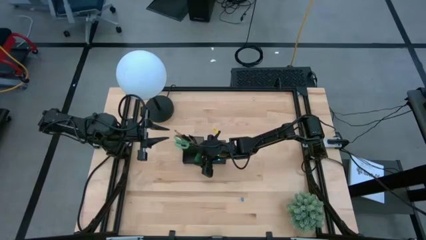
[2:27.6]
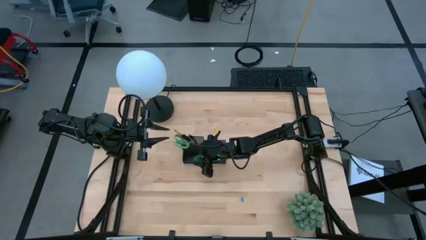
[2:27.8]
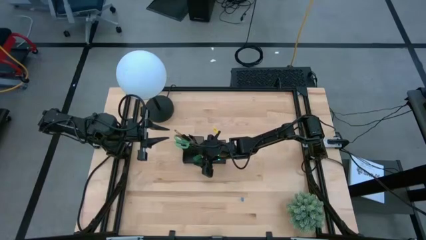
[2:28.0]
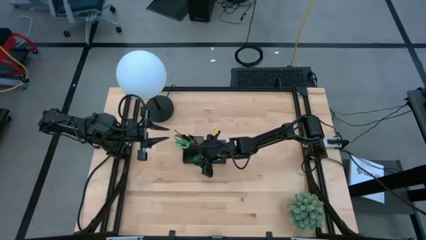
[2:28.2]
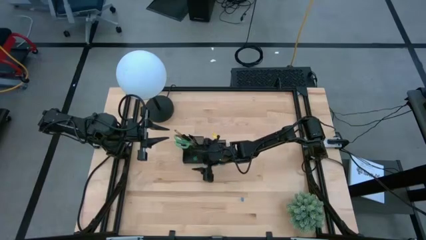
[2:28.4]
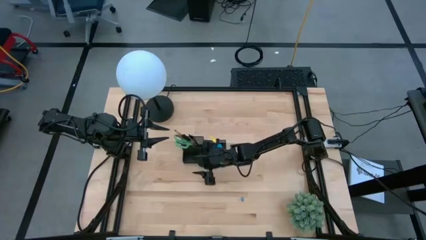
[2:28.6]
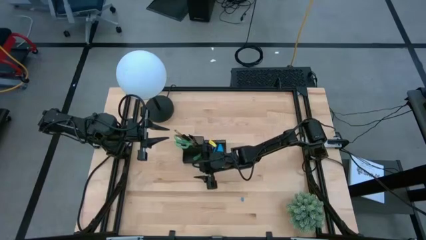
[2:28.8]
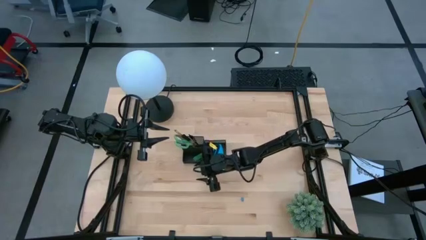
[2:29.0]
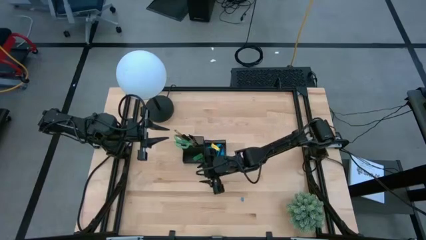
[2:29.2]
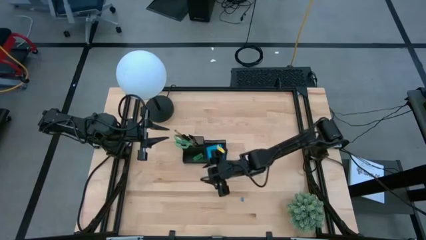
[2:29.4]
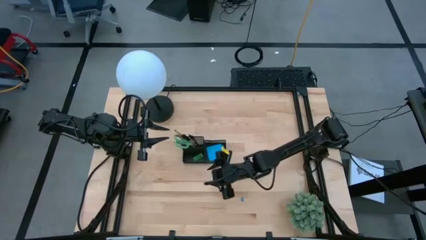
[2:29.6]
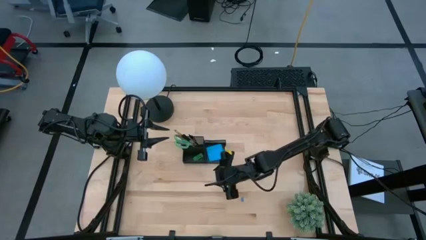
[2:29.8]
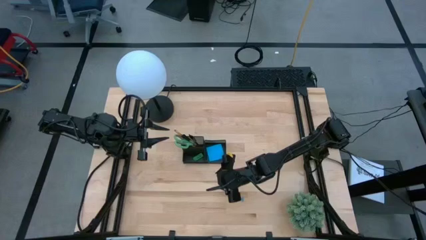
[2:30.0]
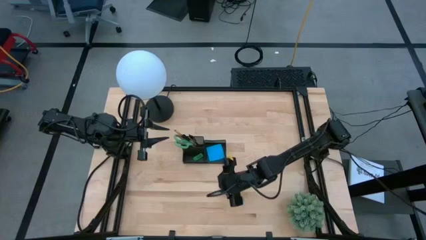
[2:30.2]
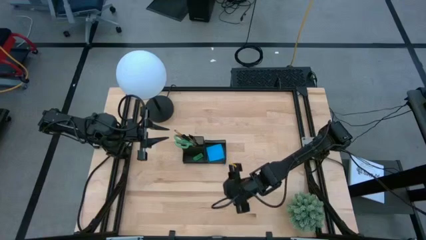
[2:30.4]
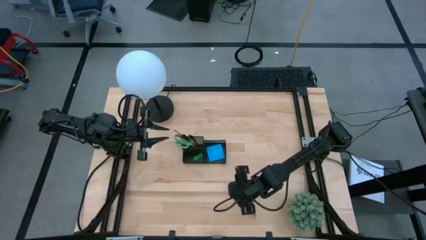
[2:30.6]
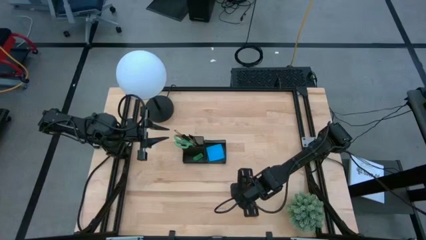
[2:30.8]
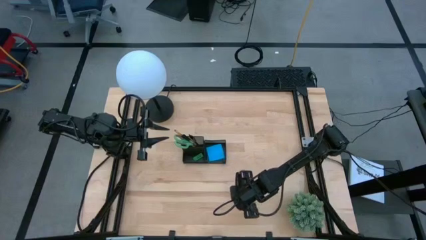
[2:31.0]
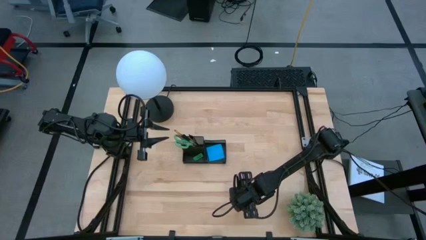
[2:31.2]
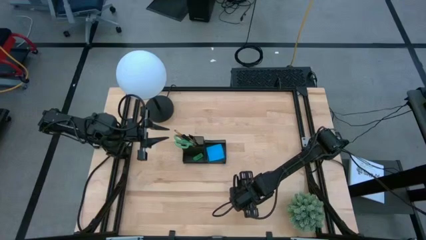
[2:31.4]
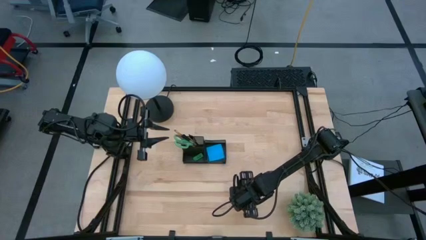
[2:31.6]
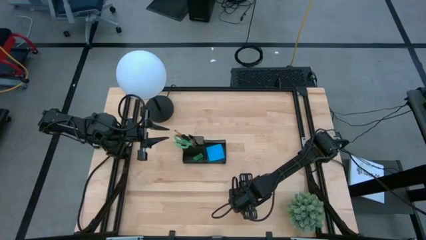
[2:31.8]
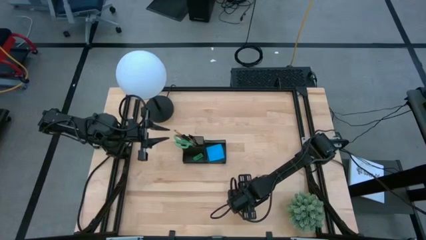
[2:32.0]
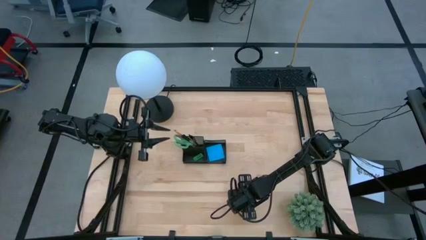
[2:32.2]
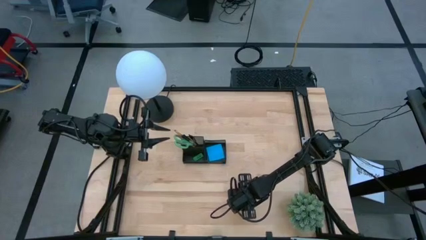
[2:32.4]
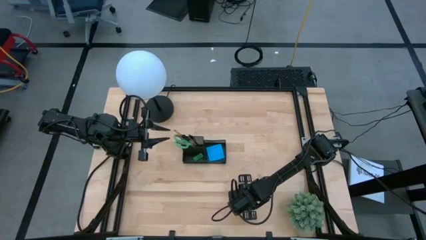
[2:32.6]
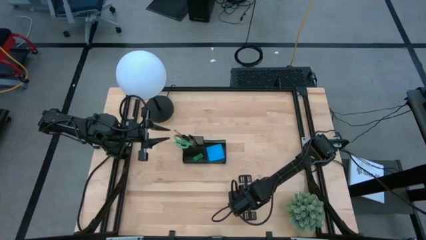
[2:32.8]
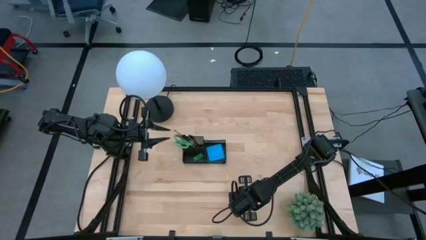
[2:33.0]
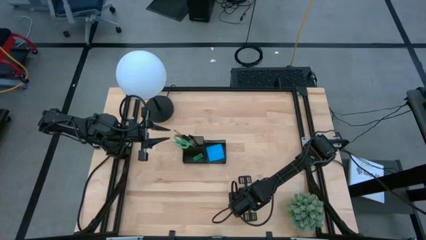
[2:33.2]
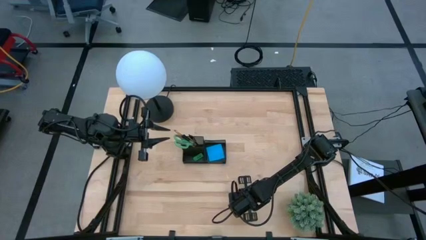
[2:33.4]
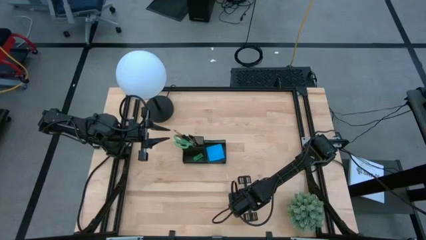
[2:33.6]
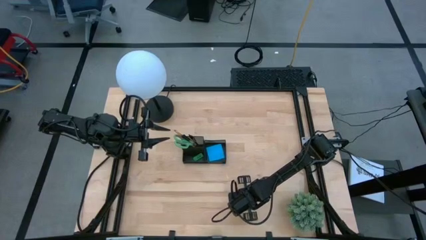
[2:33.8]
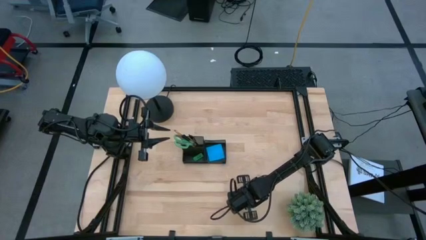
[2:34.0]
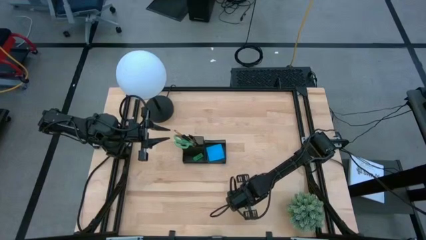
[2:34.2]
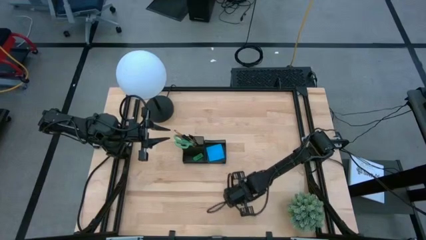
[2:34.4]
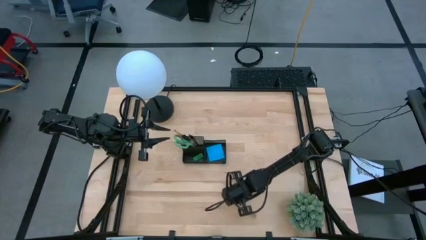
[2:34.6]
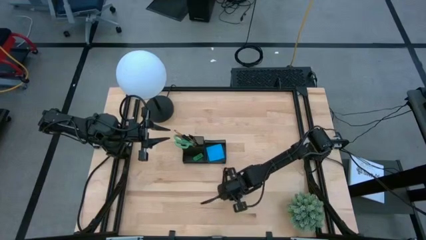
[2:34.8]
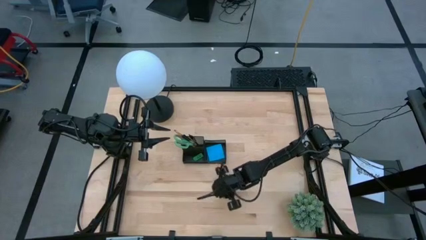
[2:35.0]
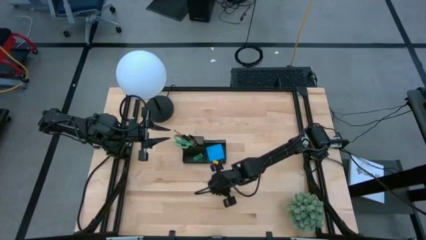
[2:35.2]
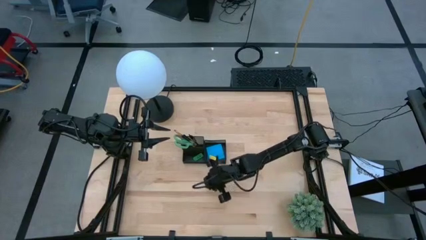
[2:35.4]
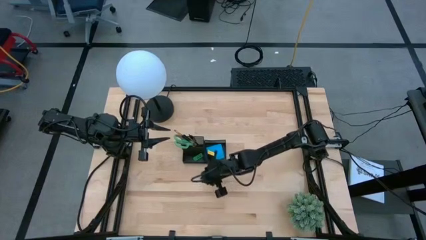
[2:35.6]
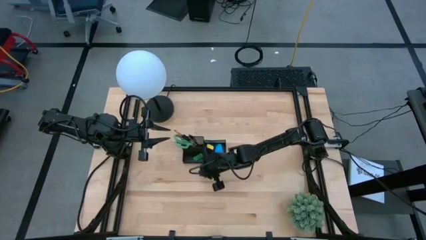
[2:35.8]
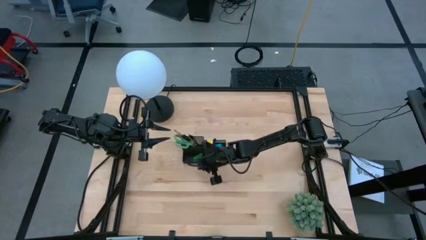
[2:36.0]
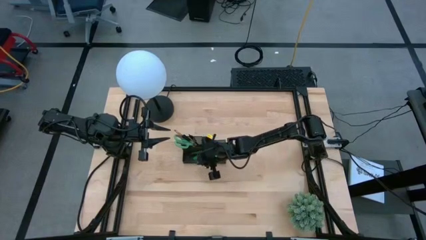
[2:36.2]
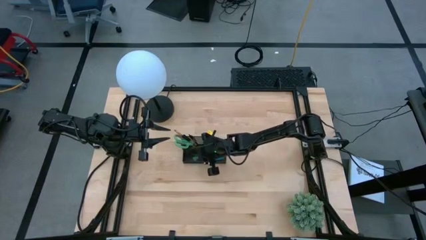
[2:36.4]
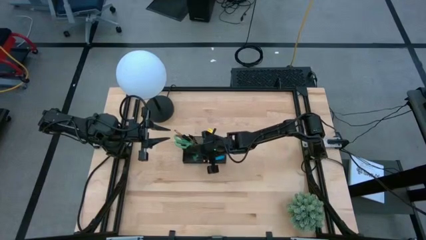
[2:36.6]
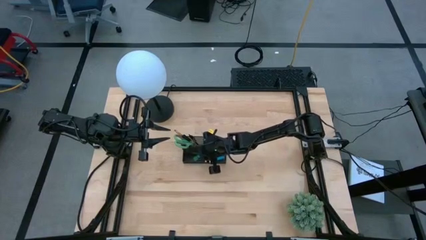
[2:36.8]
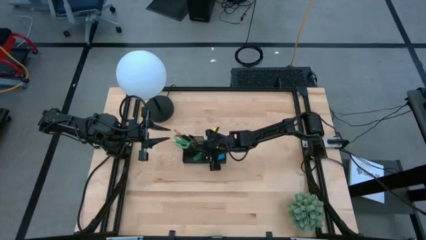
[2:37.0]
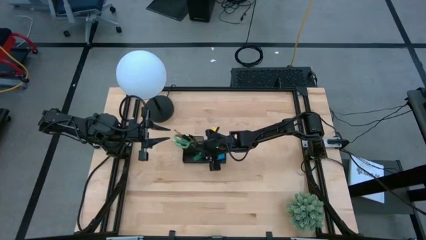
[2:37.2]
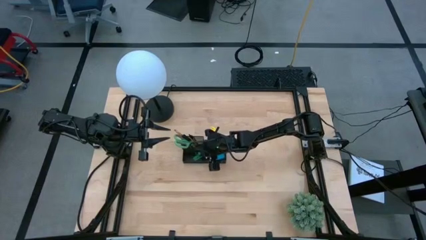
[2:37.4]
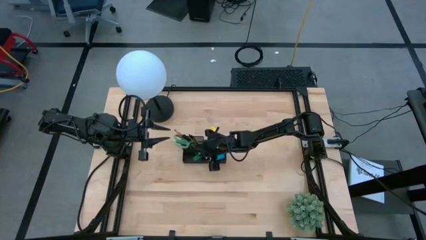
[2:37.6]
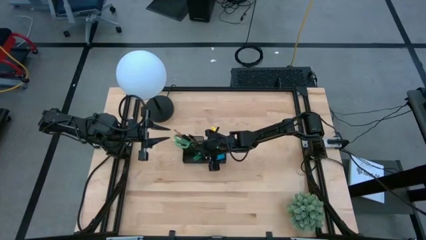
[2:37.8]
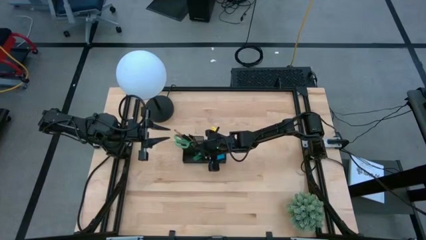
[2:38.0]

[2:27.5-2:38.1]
Task: Pick and place office supplies into organizer
Put the blue binder clip into the desk organizer
